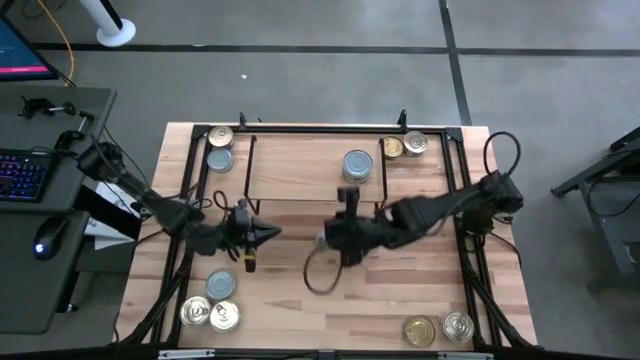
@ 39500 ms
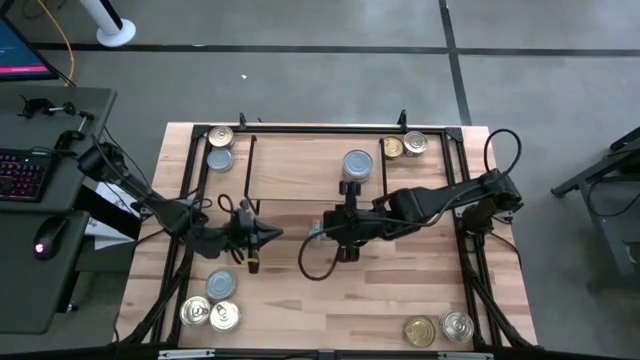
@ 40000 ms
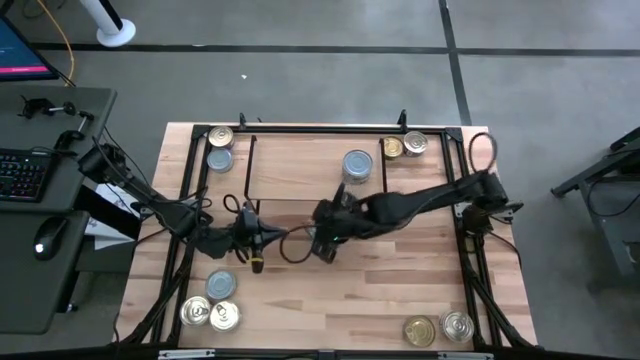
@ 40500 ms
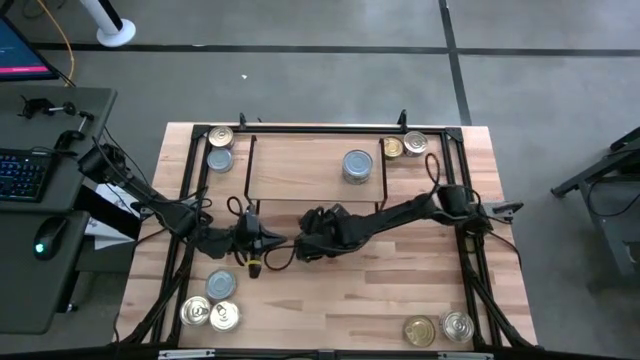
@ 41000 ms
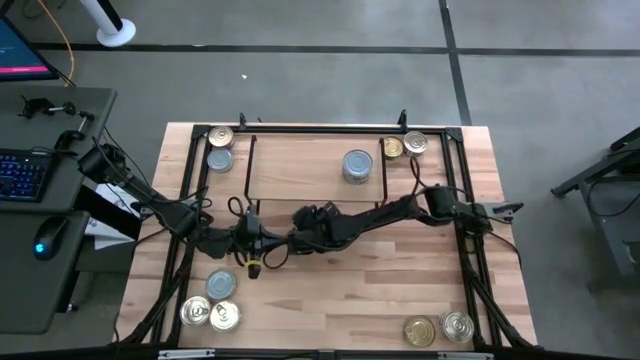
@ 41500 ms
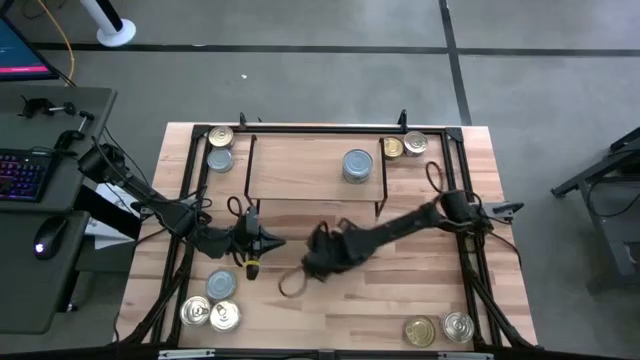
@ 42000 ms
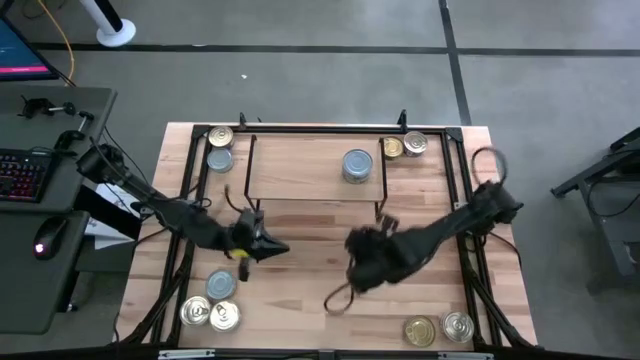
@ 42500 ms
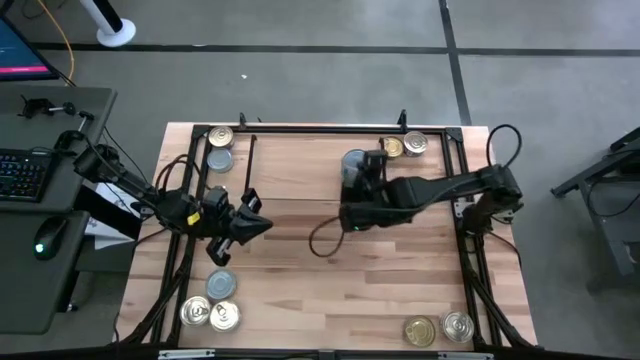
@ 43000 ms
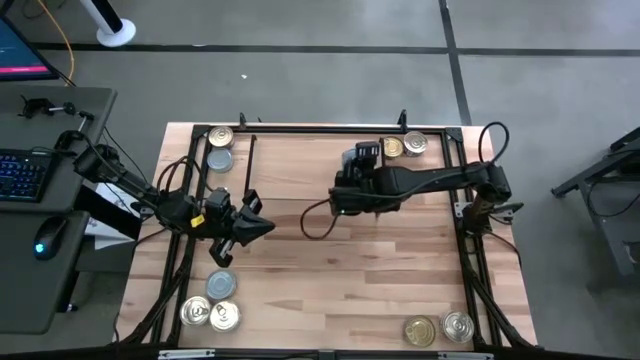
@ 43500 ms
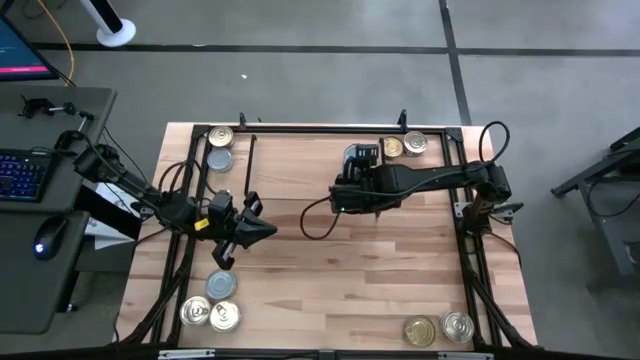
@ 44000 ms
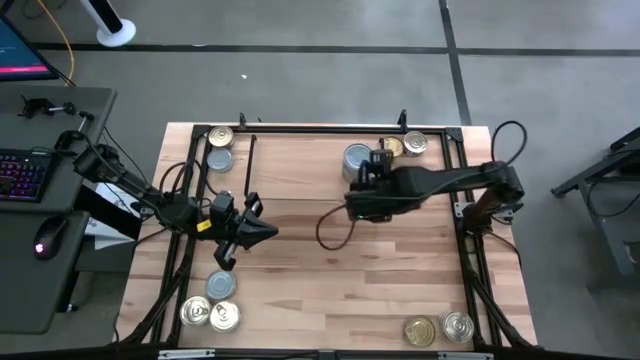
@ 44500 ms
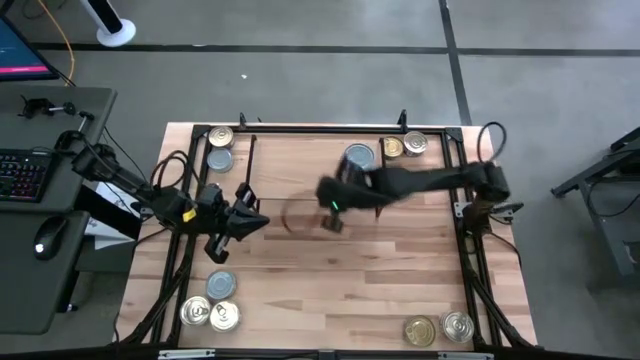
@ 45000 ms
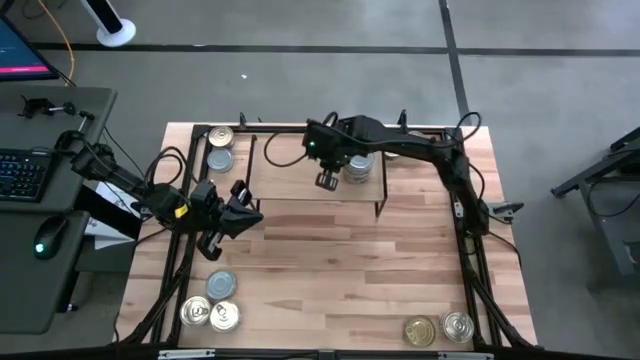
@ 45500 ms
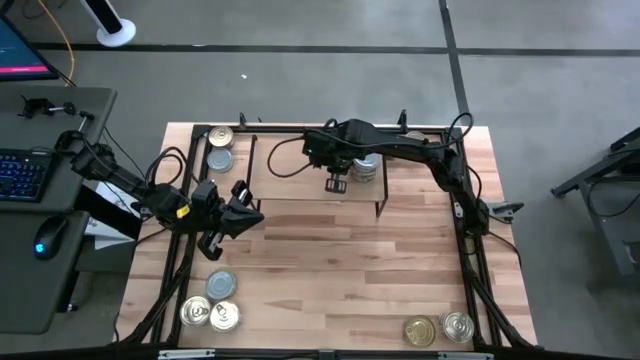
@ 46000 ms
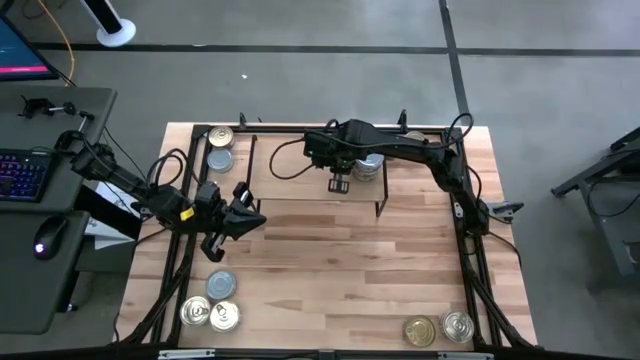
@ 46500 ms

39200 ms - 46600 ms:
Task: Stack canned seafood by type on shelf
Stack the green white tuna can on top of the other green white tuna can on the shelf

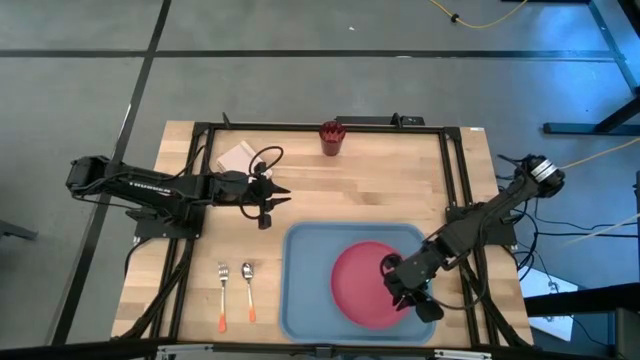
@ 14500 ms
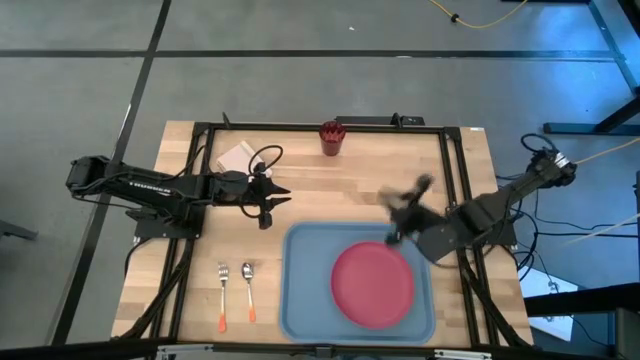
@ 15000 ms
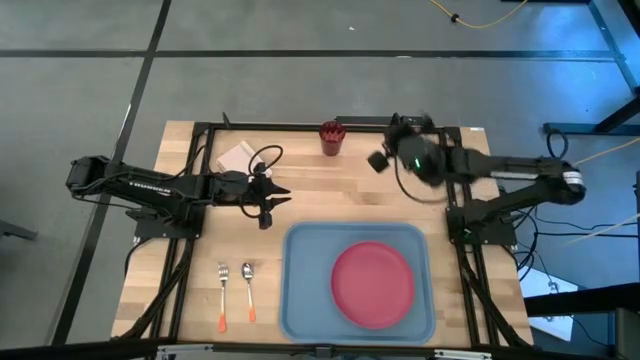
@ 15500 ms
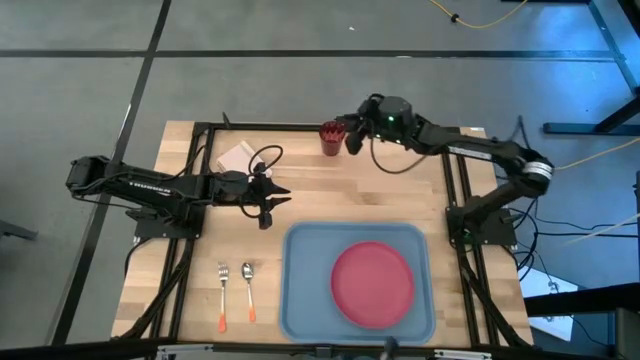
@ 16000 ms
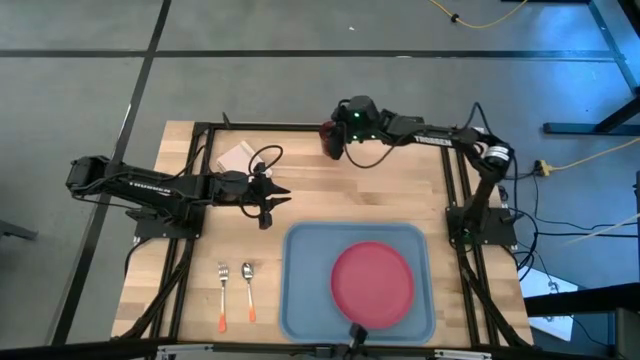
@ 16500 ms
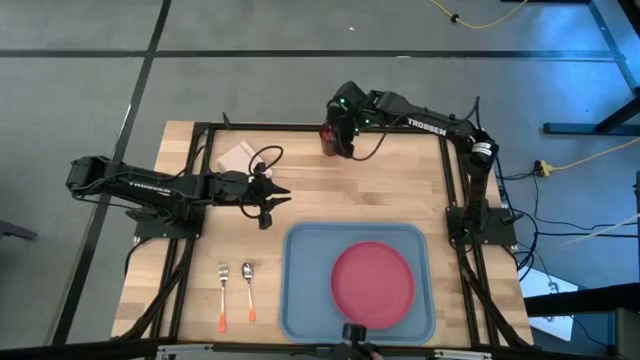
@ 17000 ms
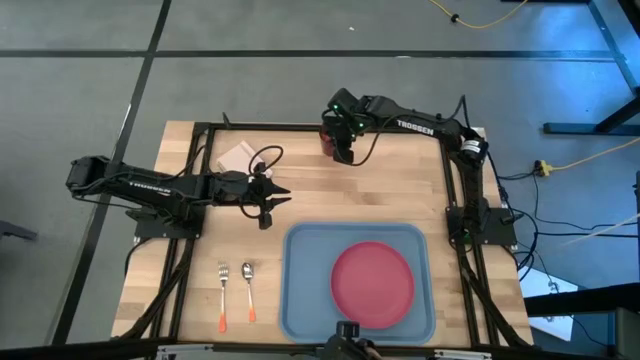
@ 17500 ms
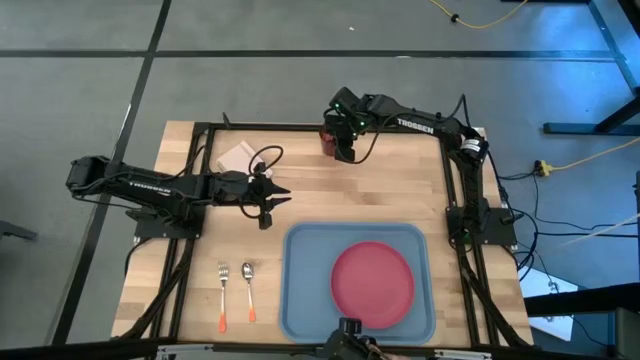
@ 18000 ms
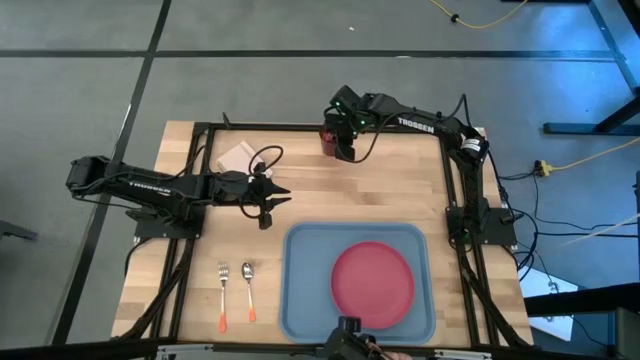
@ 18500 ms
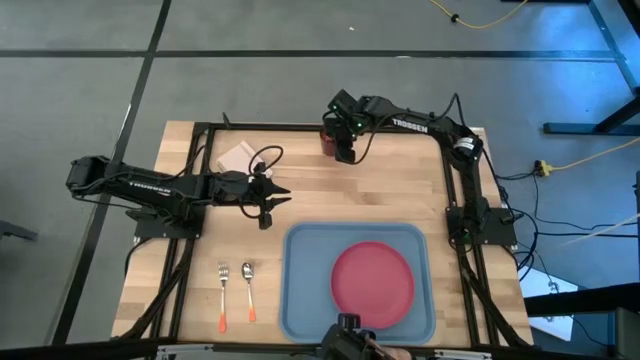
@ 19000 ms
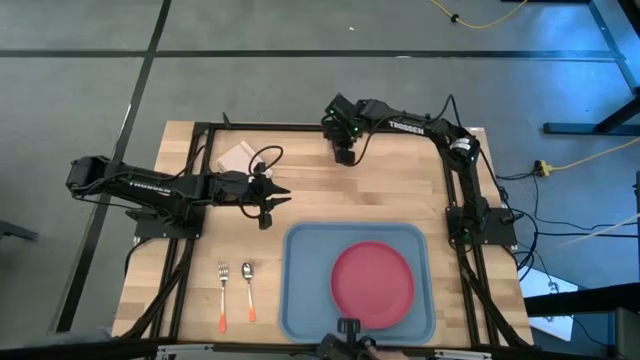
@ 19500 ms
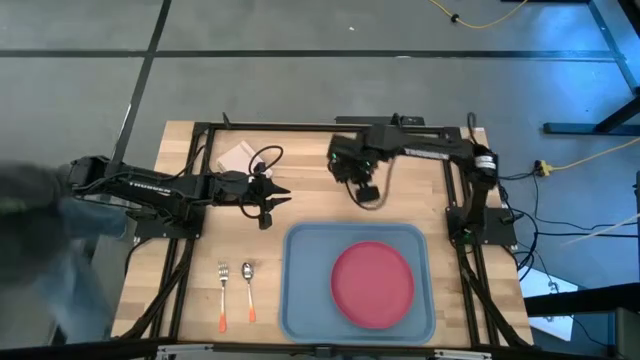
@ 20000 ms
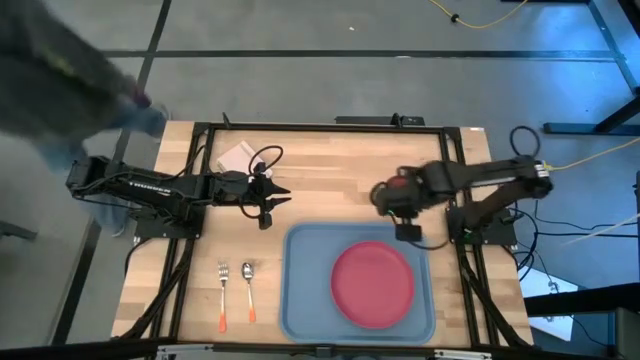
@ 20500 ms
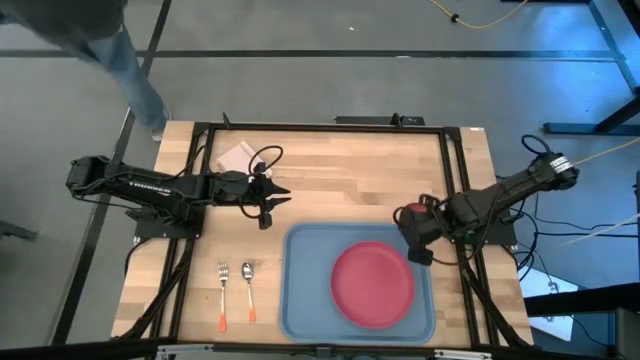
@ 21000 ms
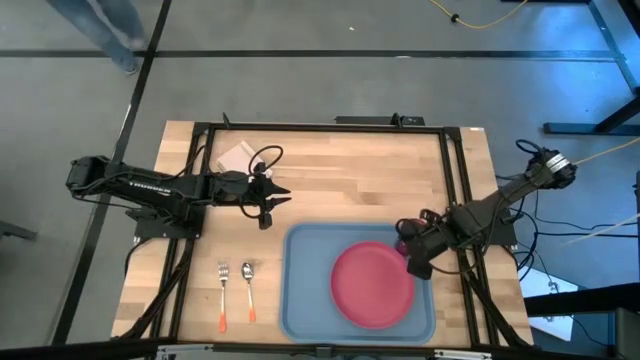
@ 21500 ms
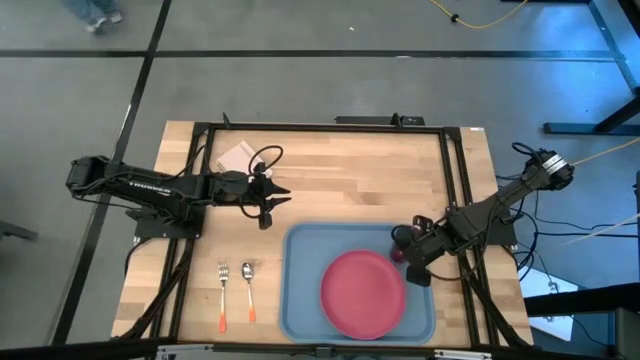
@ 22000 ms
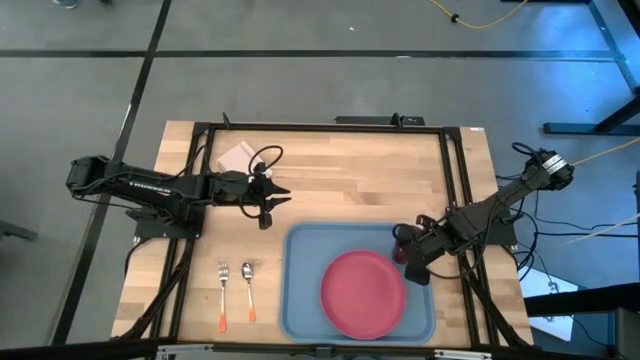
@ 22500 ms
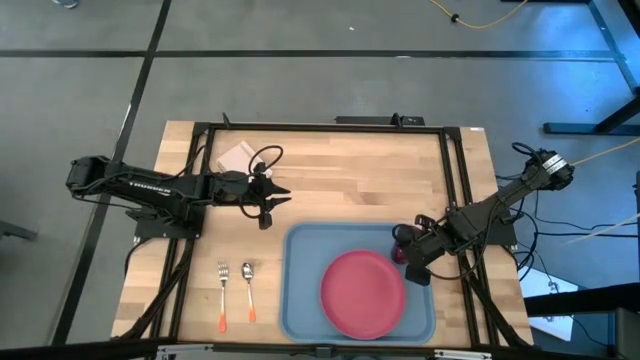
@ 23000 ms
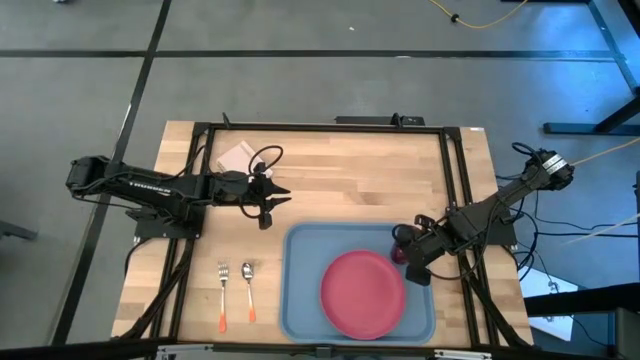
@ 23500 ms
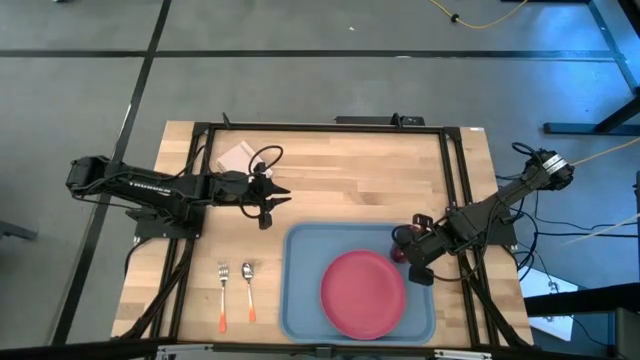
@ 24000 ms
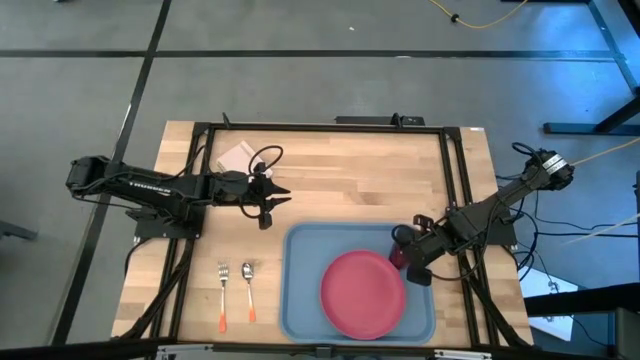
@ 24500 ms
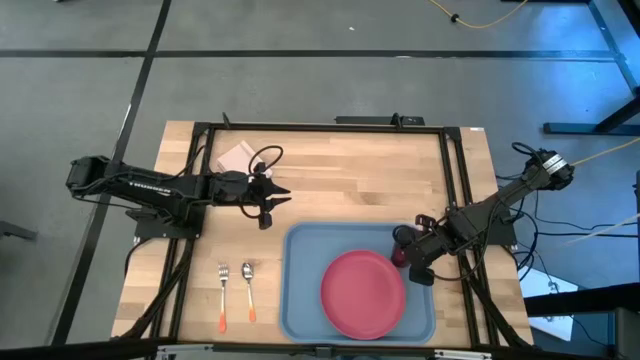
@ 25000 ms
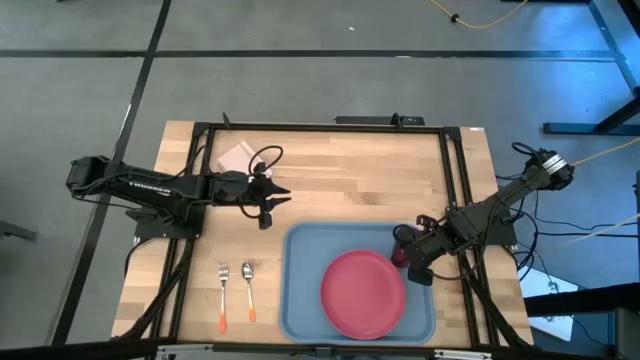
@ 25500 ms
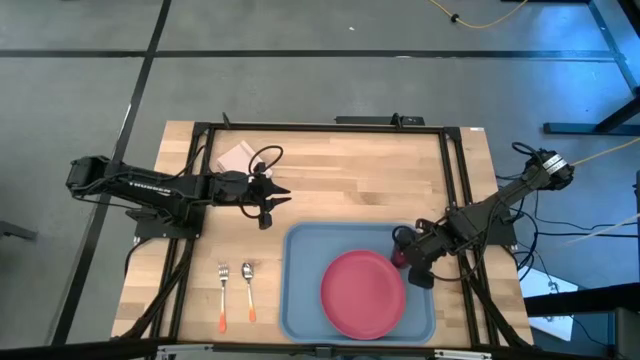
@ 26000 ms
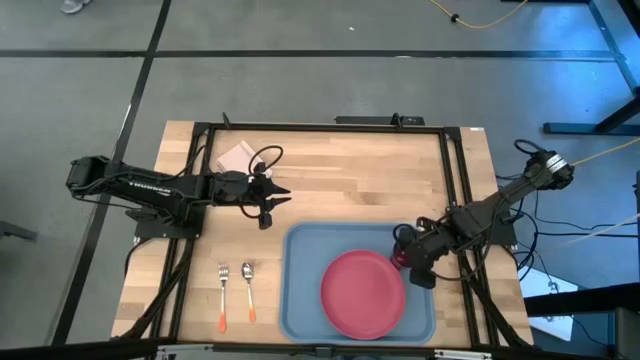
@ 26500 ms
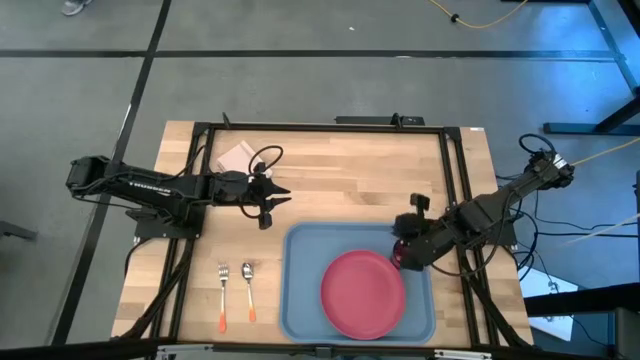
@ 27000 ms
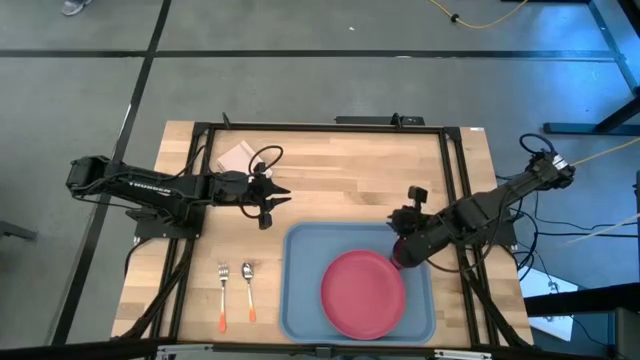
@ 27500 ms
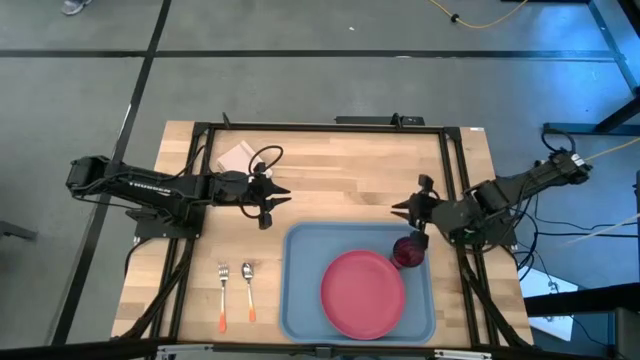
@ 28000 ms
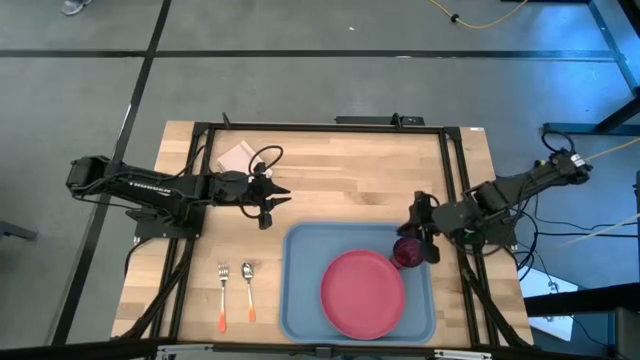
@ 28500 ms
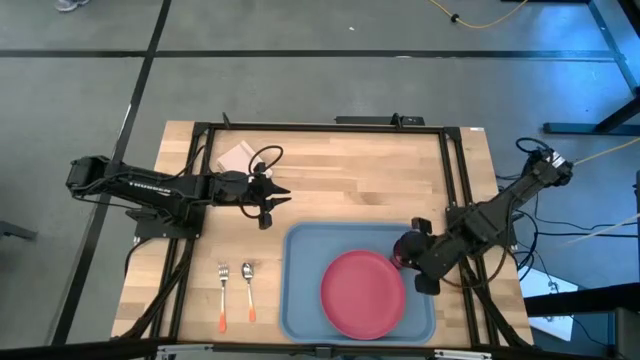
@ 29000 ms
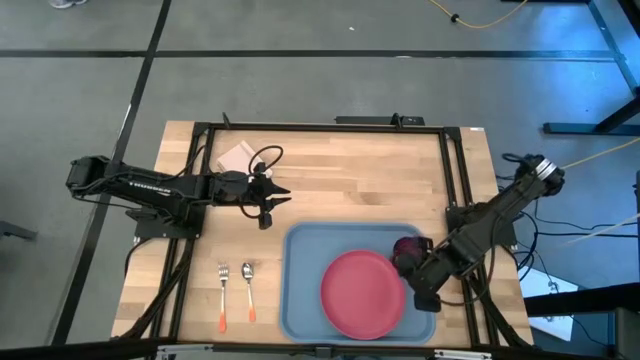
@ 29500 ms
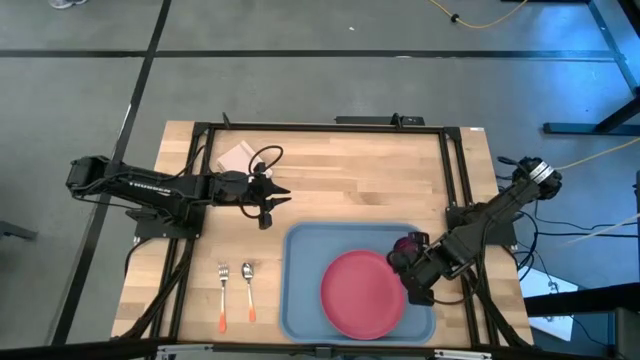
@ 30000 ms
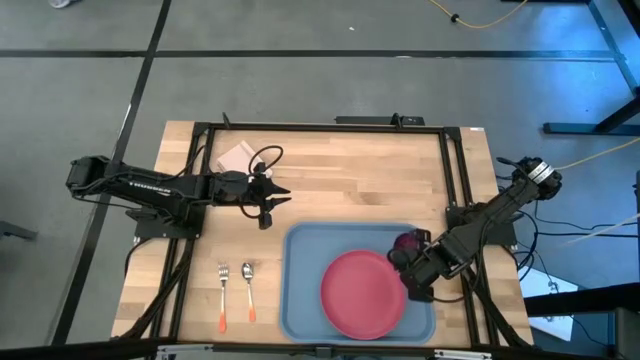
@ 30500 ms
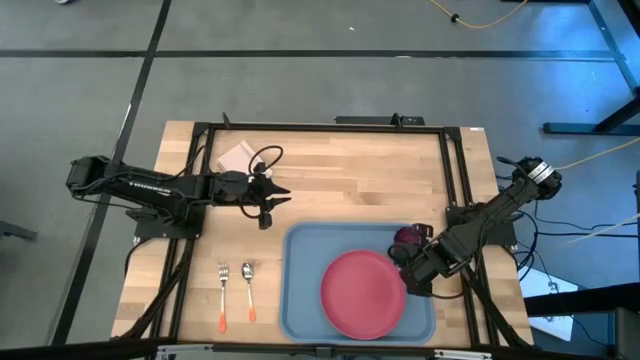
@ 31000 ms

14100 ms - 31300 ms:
Task: Pick and place plate/cup/fork/spoon on tray
Put the red cup on the serving tray to the top right of the plate
